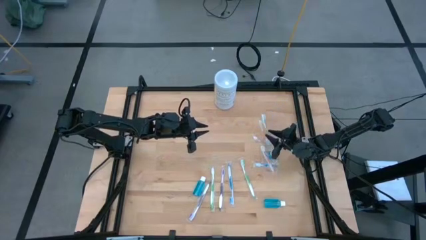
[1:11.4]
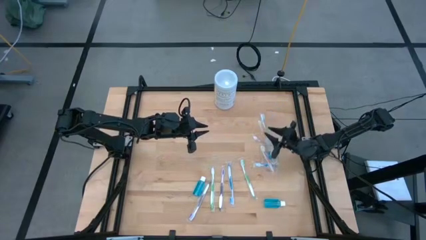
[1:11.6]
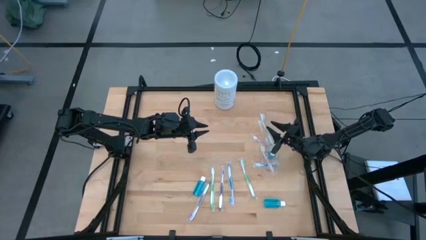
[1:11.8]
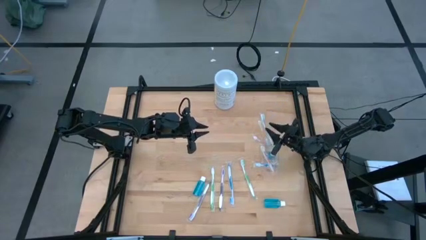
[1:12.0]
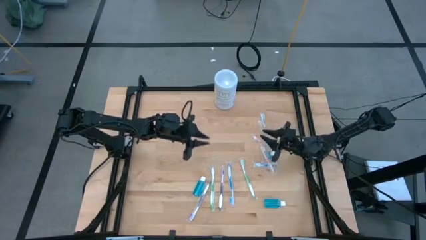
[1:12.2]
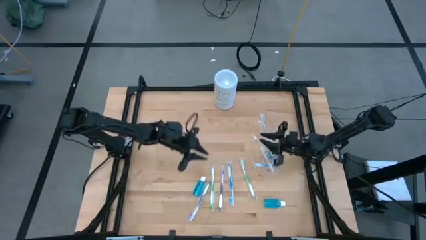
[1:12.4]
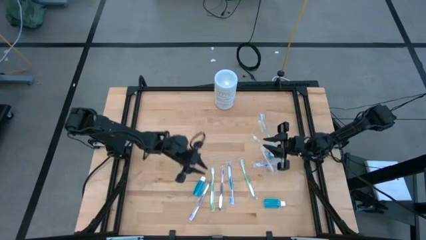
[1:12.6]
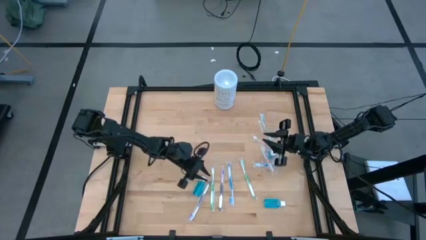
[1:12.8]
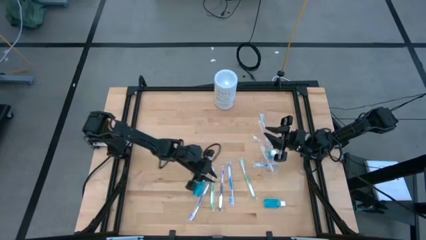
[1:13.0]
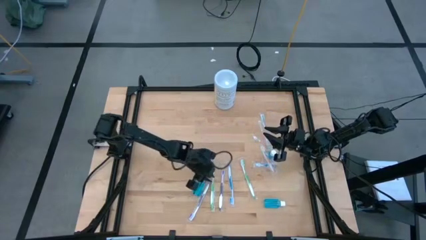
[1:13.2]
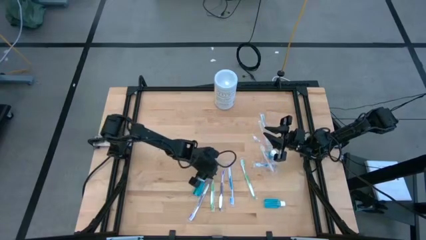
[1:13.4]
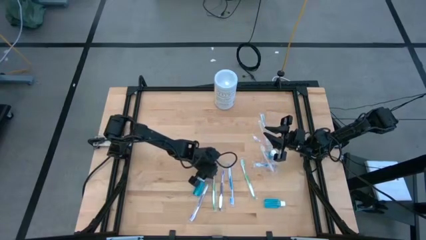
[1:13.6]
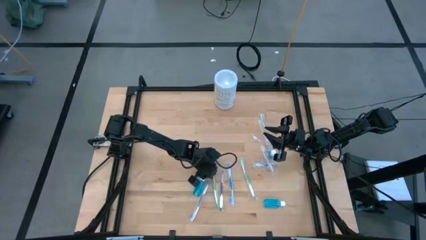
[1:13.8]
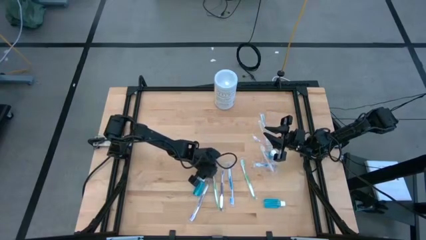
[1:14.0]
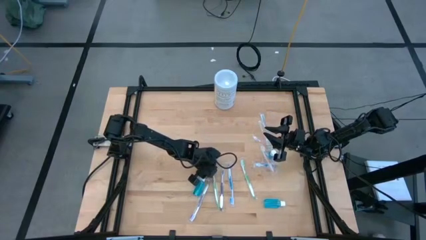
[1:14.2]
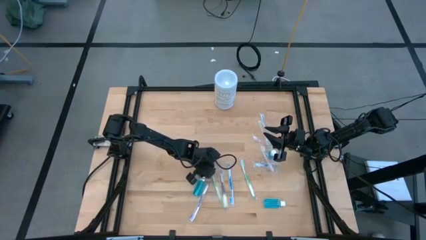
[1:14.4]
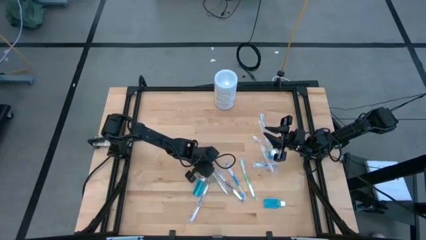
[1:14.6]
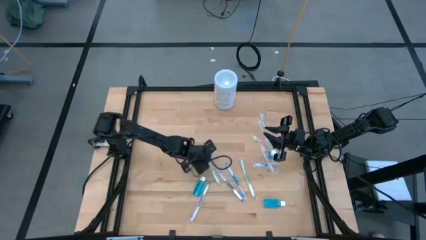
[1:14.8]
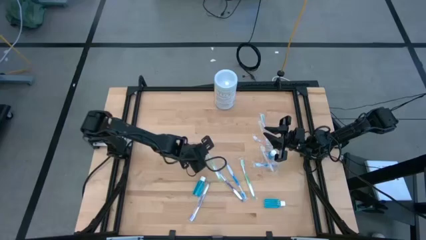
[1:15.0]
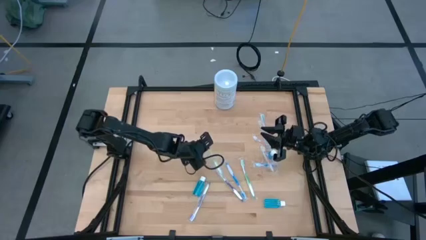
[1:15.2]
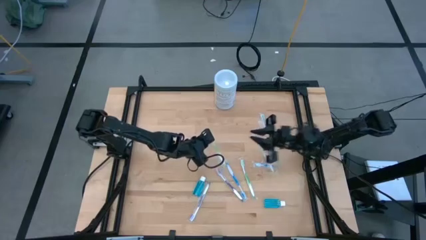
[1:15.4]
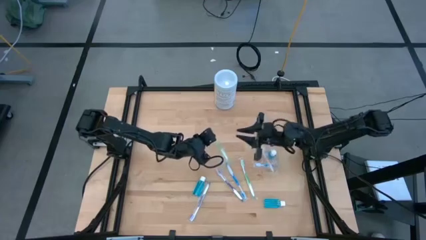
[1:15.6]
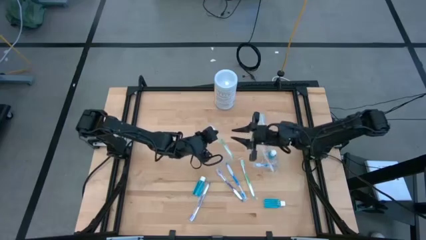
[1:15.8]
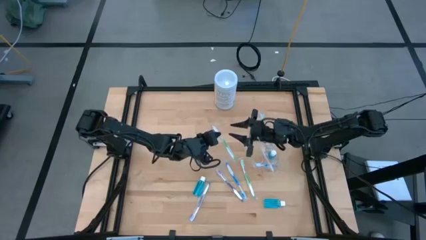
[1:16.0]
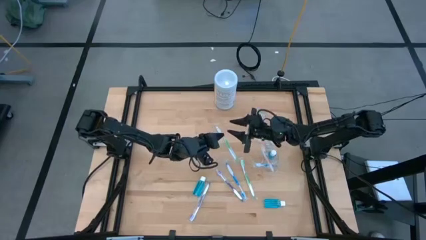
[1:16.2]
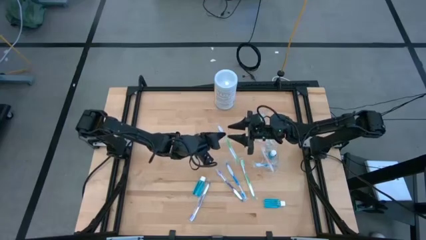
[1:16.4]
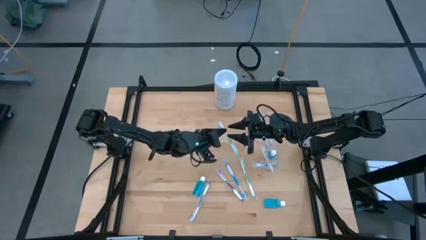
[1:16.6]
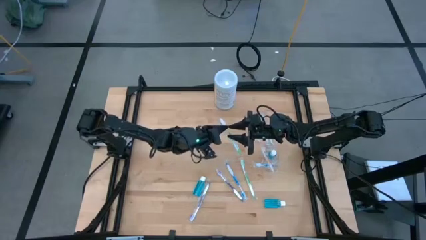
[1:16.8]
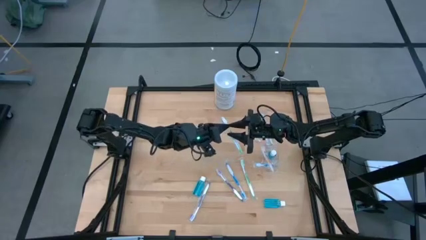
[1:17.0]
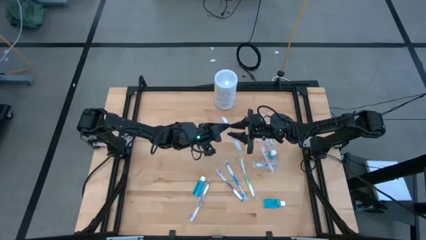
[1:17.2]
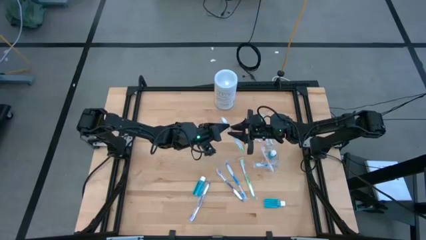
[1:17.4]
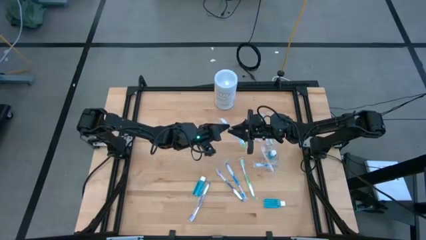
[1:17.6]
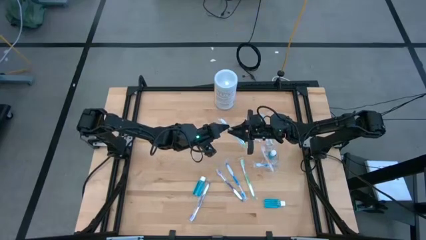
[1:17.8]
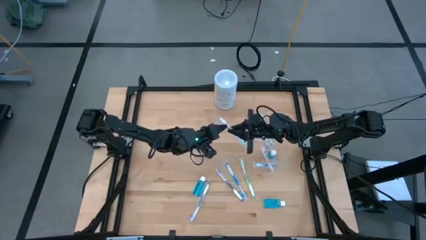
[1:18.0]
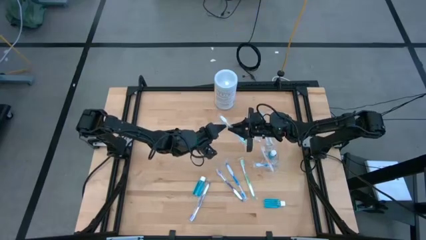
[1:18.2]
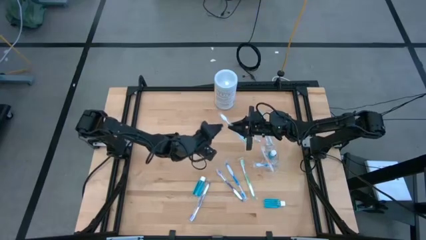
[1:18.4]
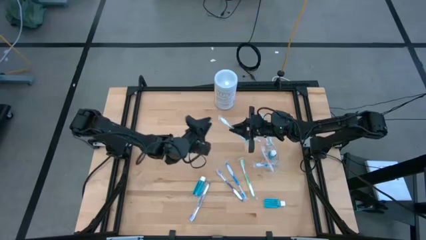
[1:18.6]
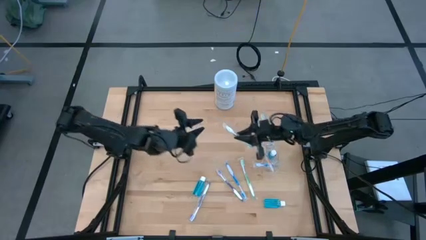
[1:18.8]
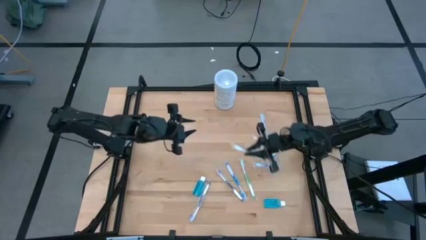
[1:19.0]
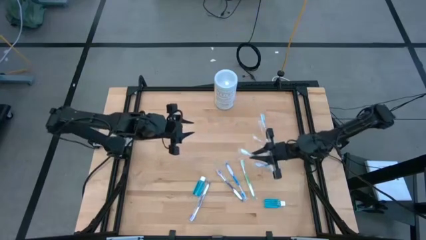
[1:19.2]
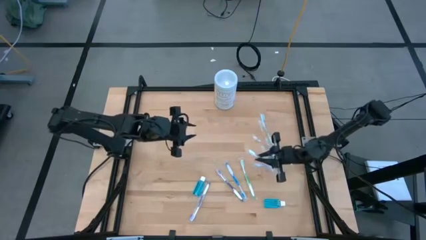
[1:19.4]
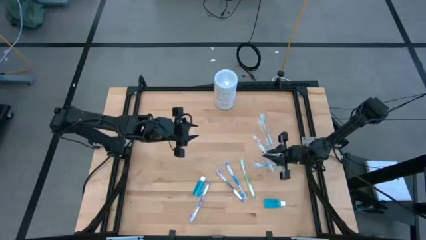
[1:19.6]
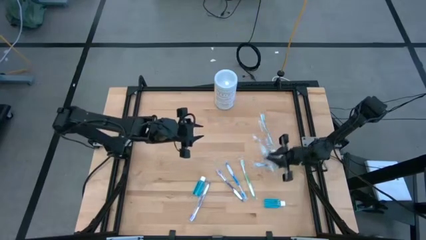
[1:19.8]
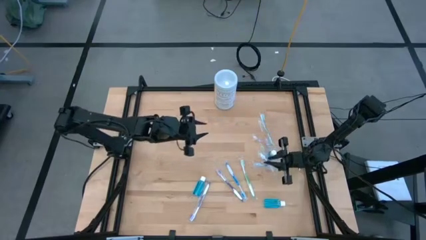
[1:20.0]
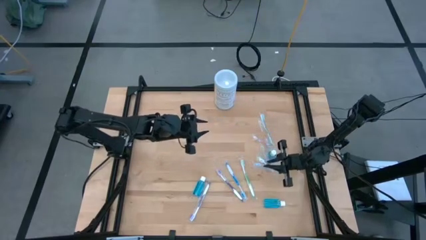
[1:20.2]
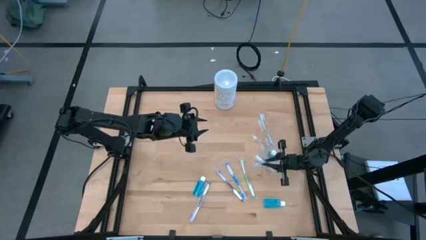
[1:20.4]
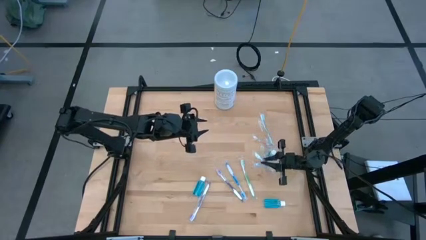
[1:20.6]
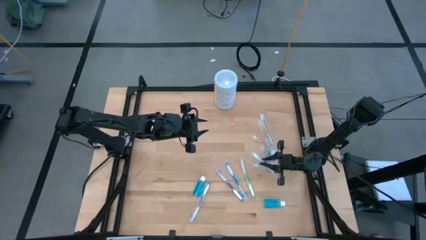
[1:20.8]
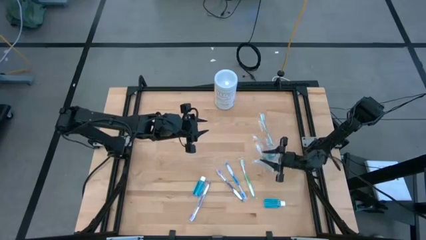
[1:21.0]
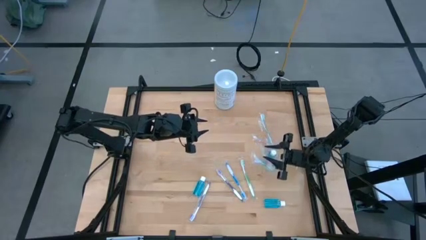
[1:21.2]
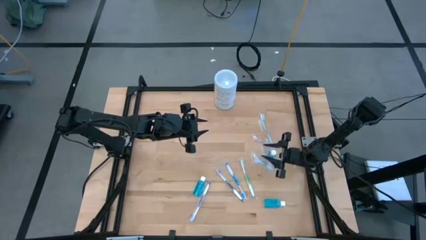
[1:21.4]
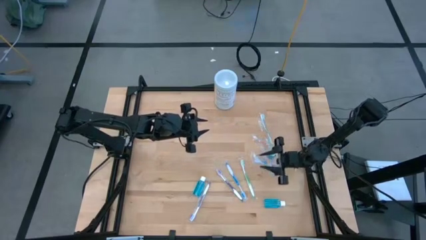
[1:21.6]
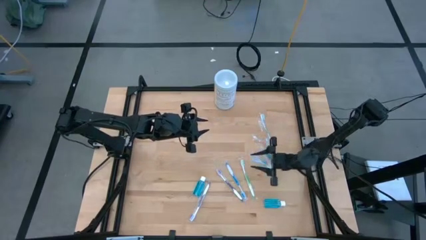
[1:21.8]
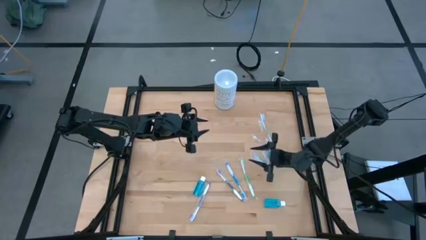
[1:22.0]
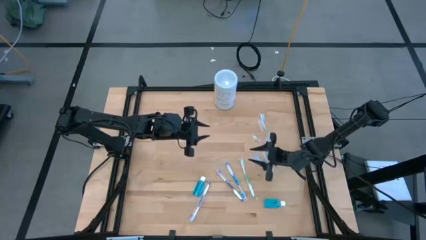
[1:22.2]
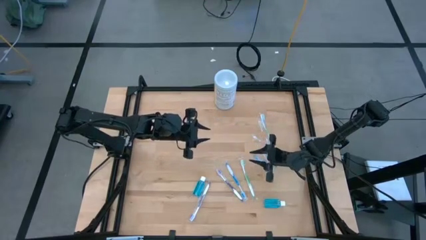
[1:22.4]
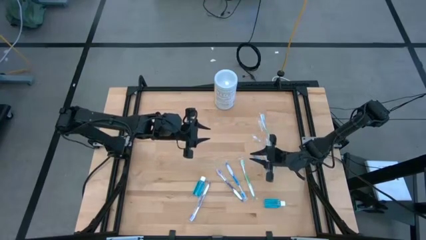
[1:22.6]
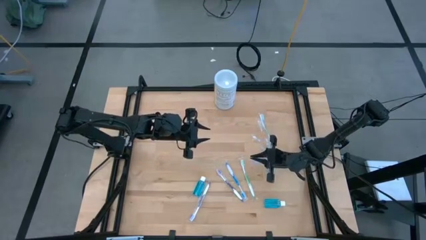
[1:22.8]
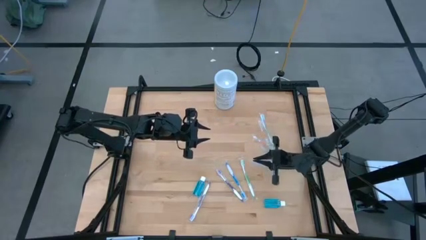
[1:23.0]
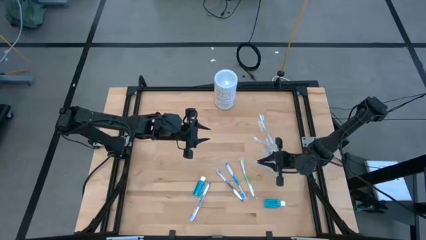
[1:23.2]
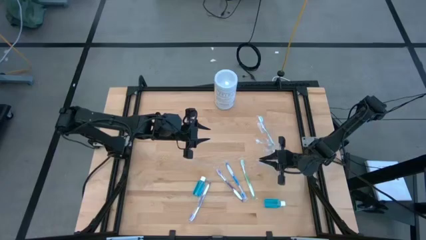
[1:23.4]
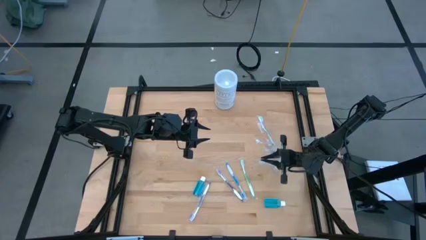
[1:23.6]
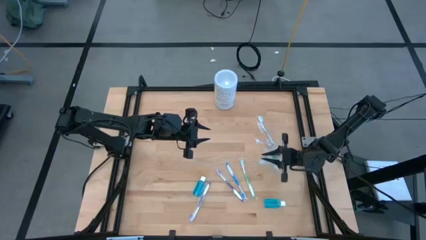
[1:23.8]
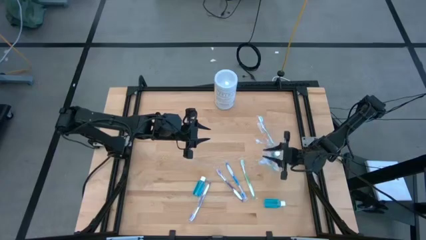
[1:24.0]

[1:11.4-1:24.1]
Task: Pick & Place toothbrushing station
Put the left green toothbrush into the transparent organizer
